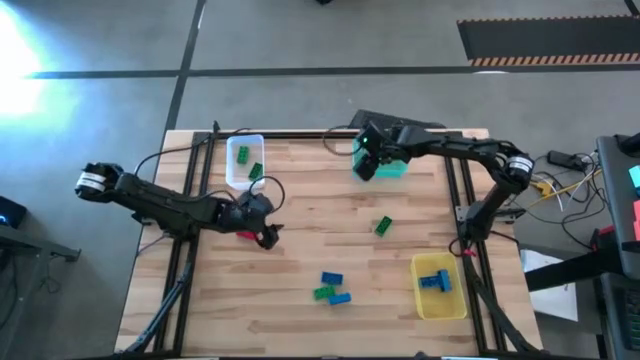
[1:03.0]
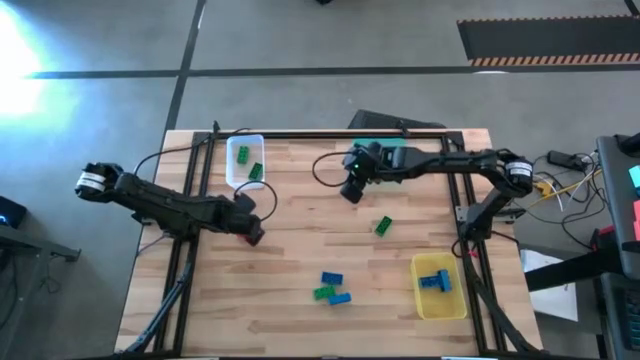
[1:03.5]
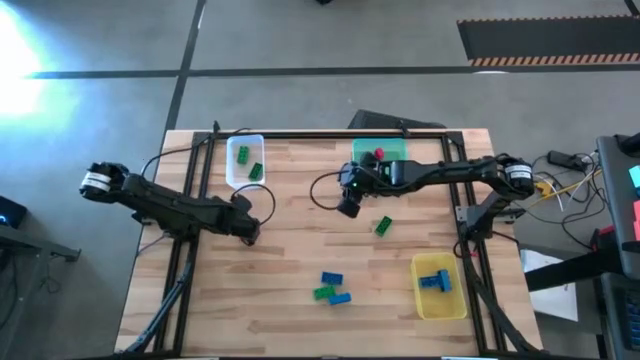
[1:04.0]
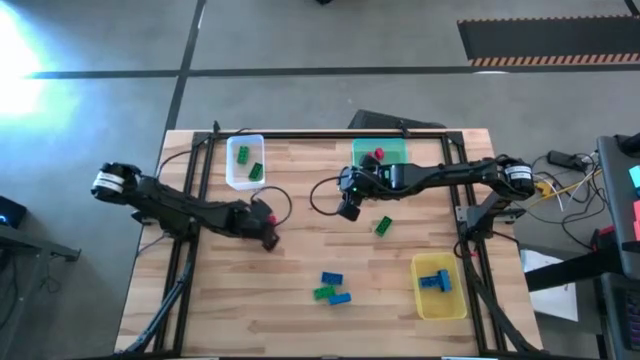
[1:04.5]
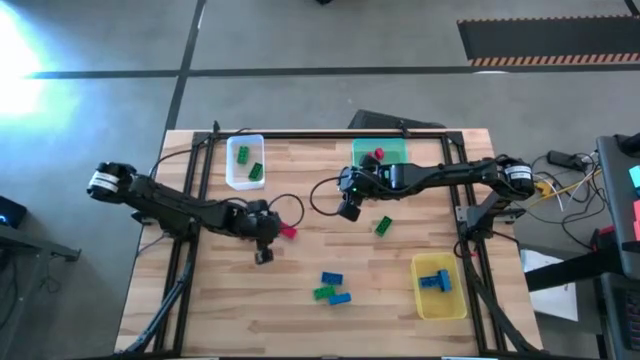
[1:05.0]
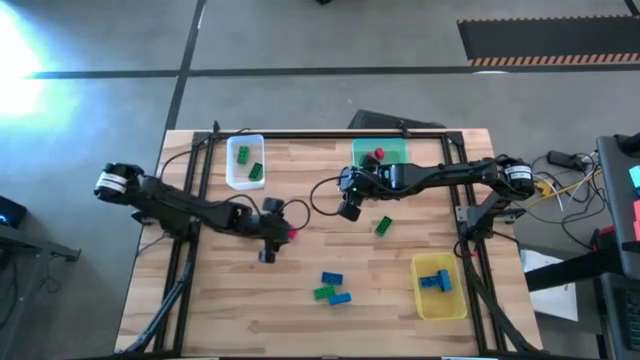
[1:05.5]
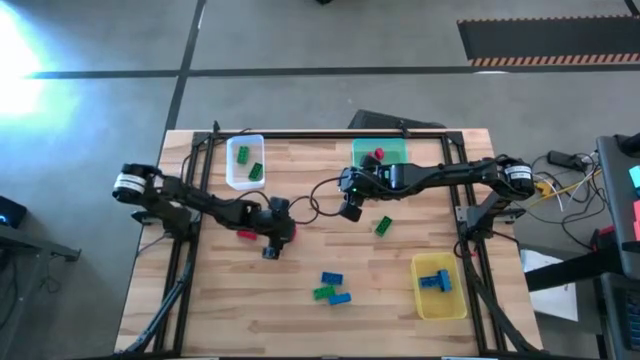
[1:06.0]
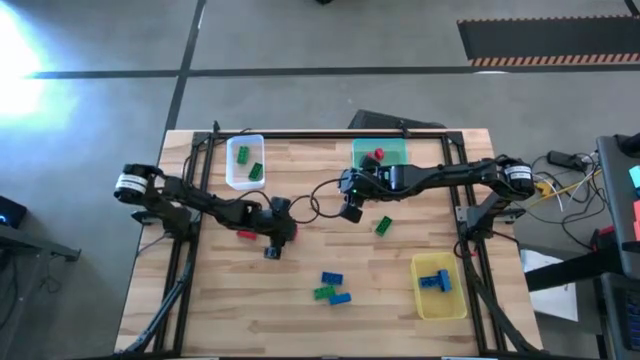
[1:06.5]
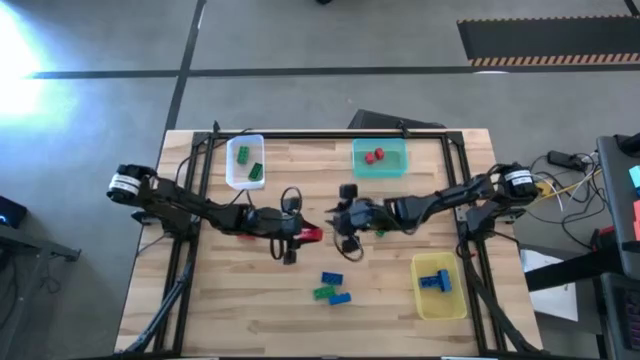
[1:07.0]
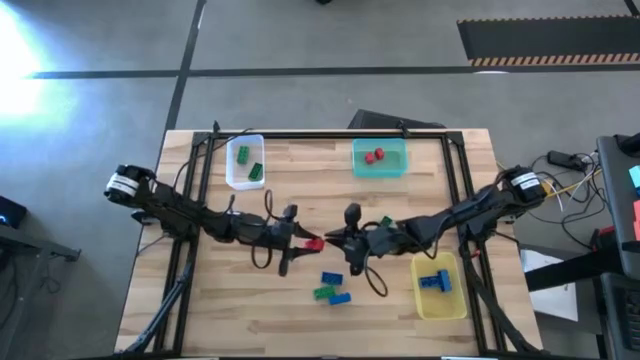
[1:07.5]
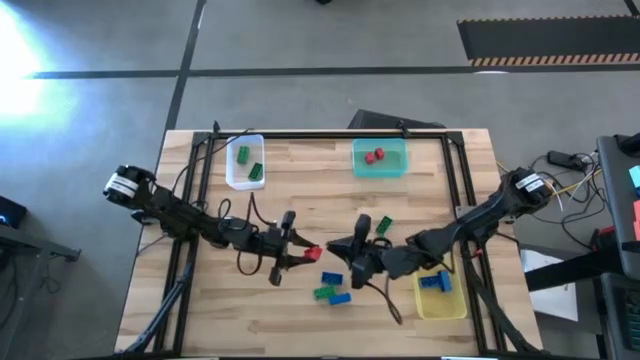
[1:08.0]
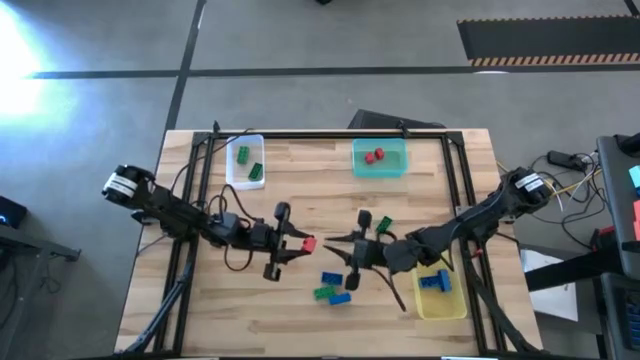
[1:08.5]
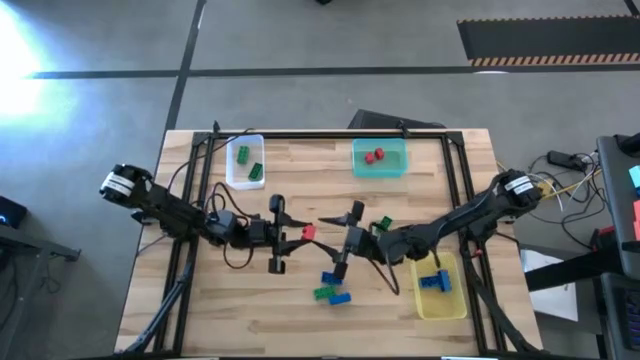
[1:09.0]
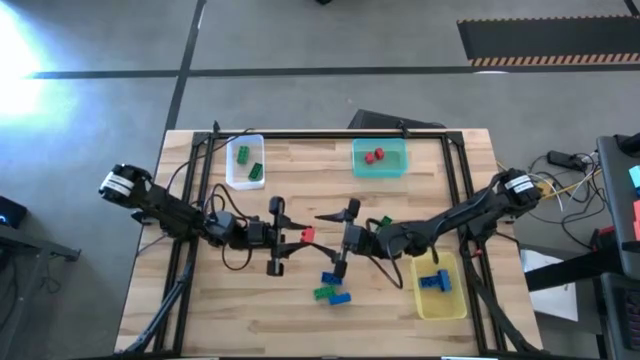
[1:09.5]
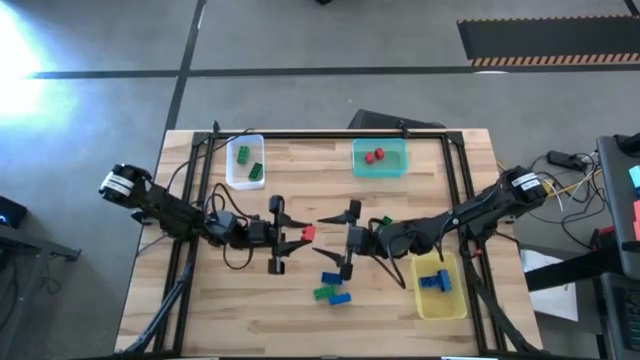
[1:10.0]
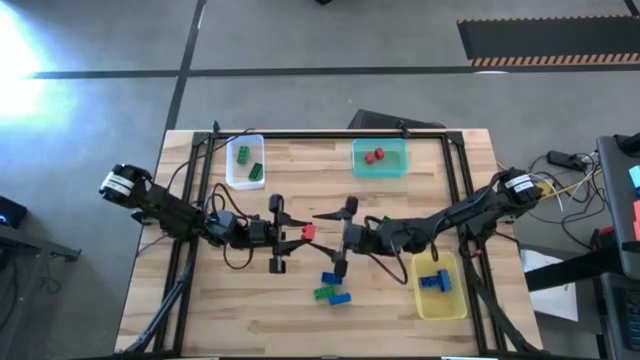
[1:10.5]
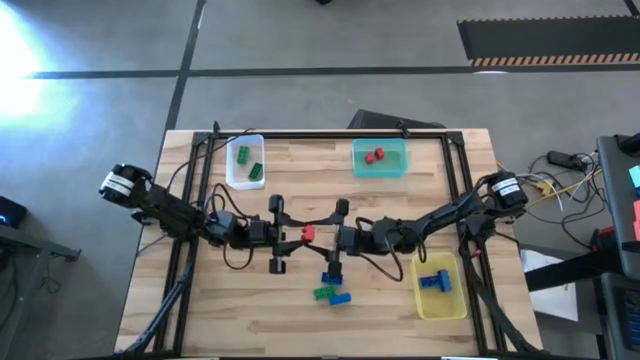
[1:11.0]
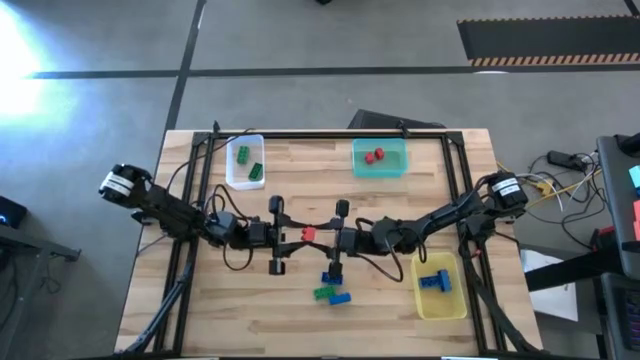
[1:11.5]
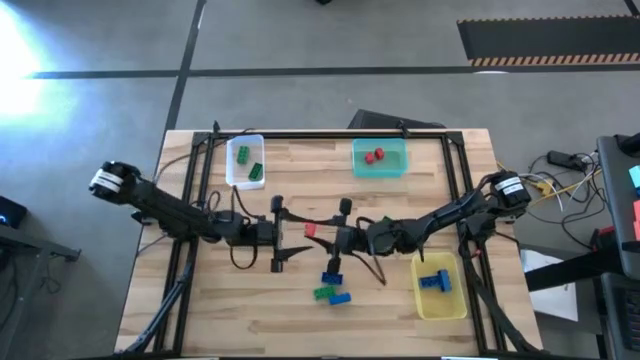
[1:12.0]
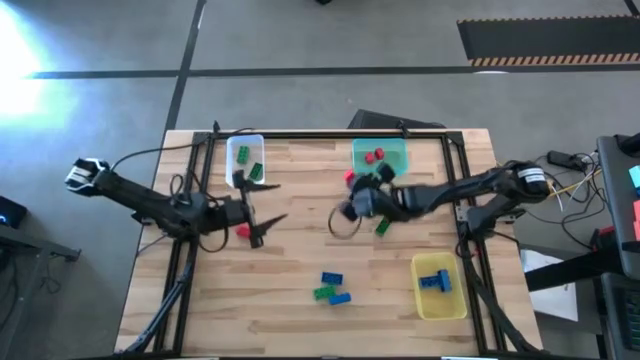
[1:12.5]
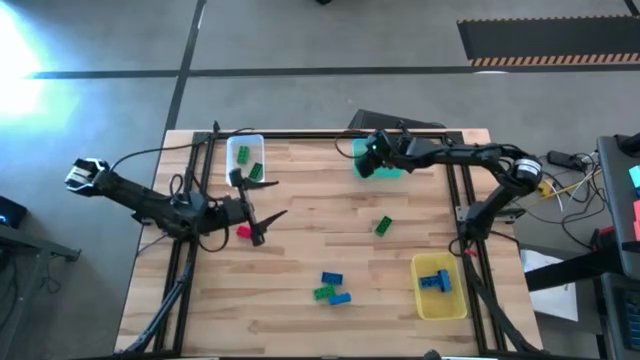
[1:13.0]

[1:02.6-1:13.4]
Task: Sort & place blocks by color
Put the red game piece into the green bin

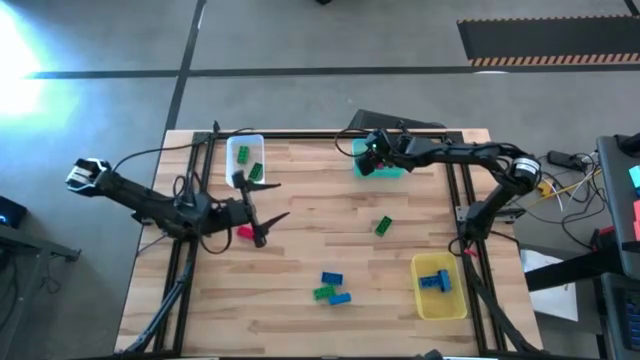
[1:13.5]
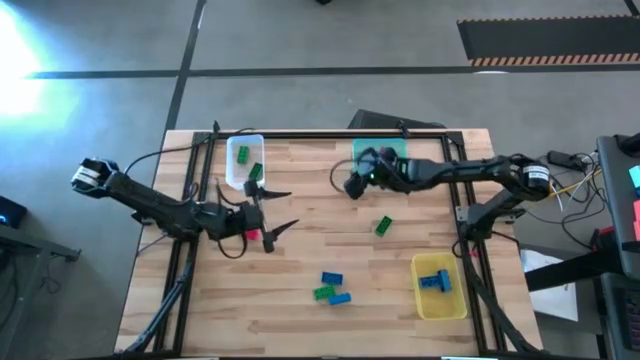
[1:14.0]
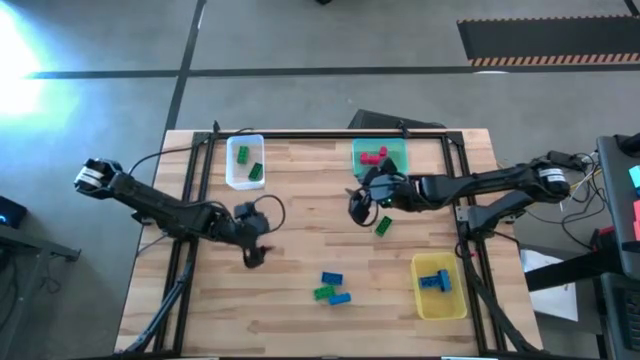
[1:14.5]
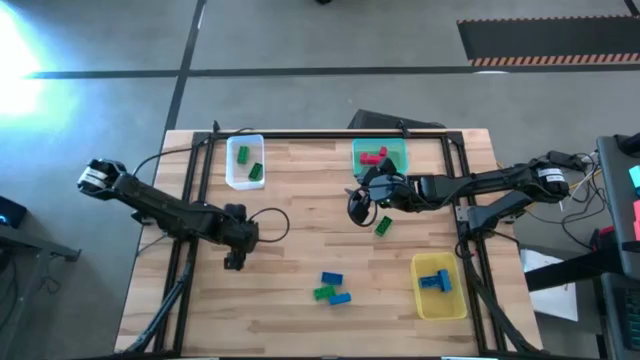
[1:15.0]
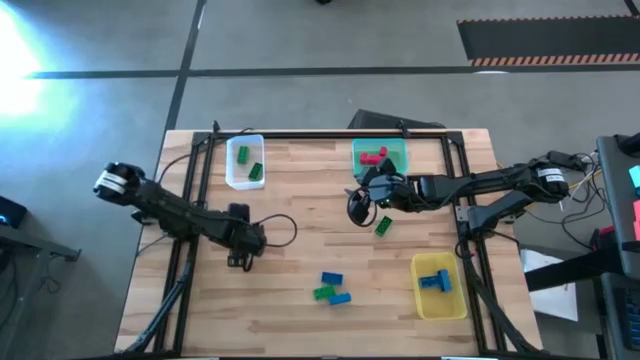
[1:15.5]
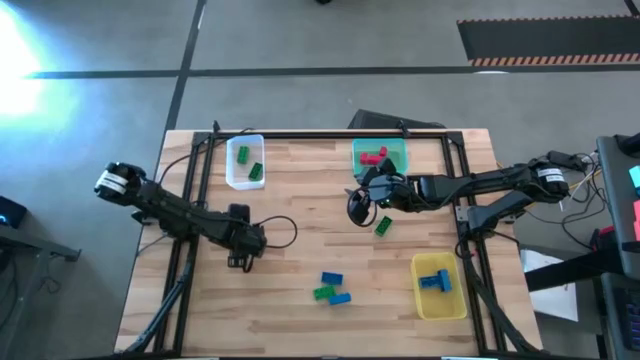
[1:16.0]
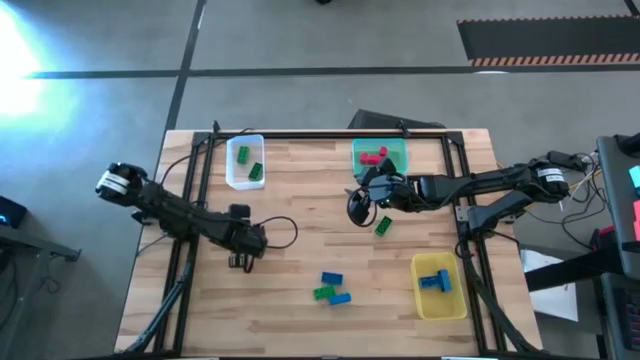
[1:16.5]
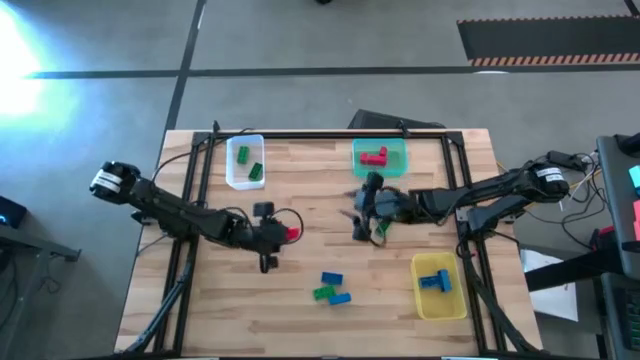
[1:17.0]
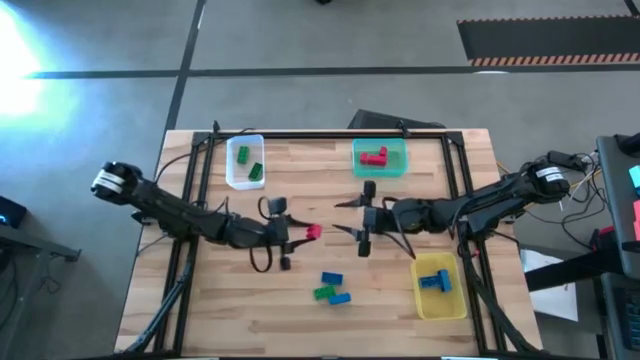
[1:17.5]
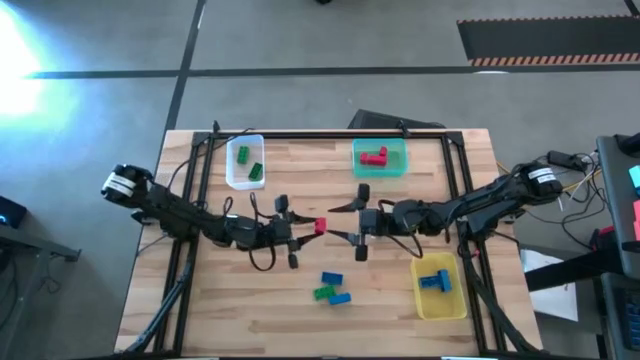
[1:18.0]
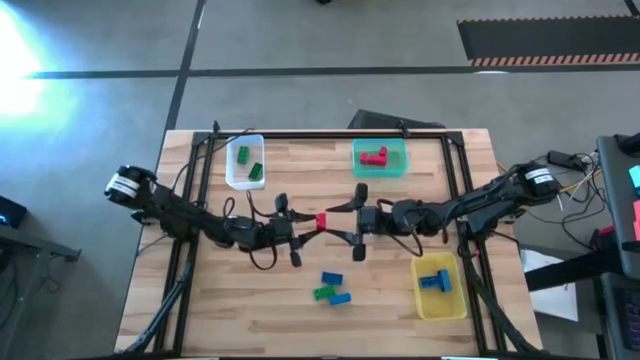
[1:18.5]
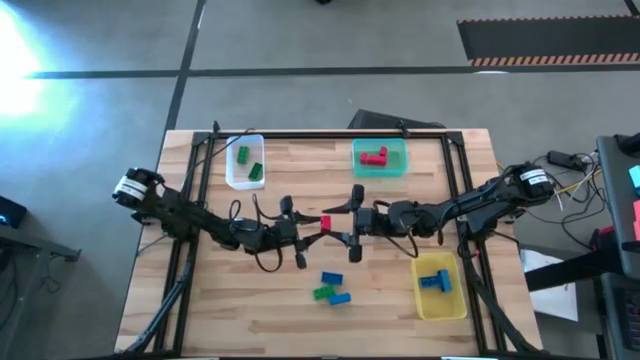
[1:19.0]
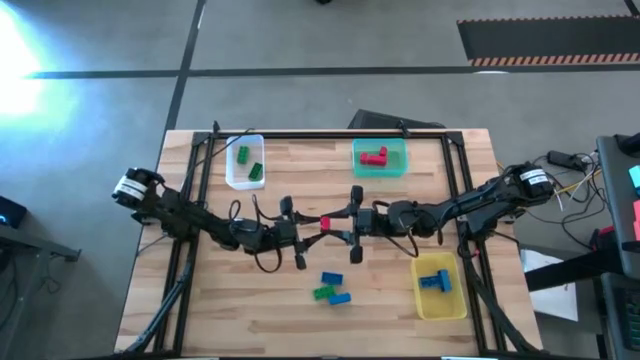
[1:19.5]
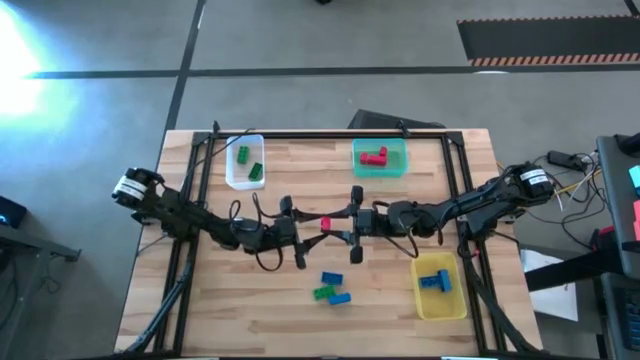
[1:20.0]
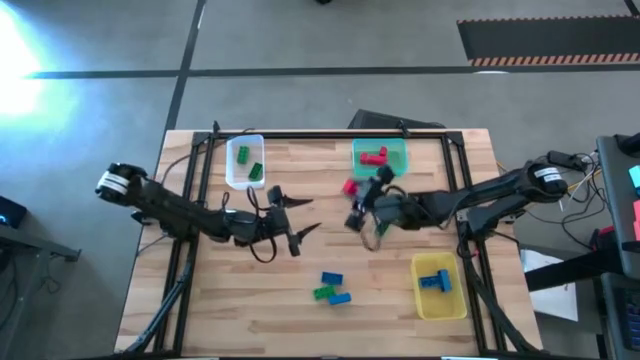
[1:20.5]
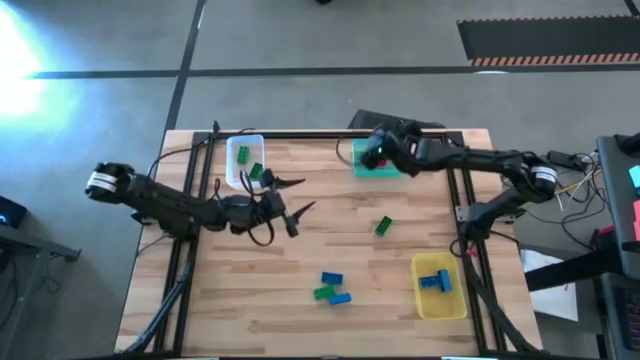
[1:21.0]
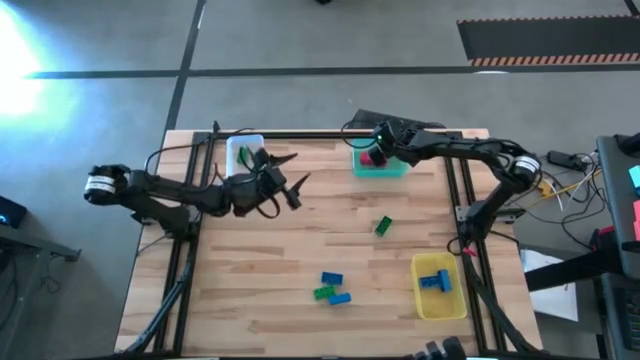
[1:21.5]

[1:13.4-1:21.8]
Put the red game piece into the green bin

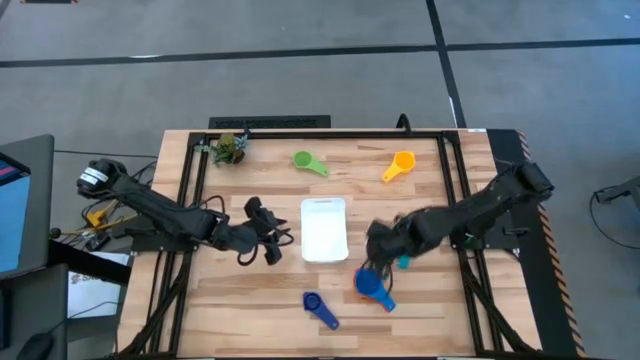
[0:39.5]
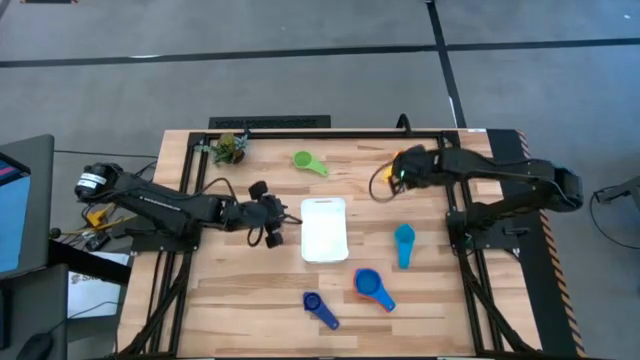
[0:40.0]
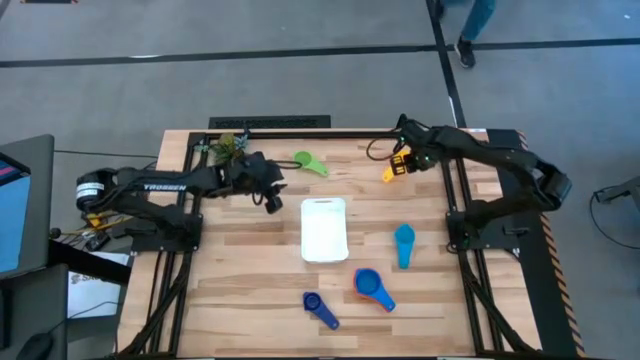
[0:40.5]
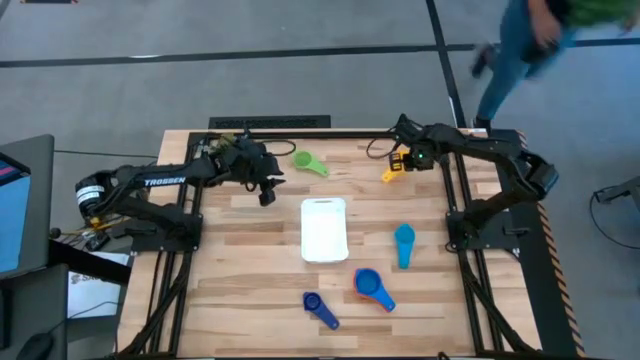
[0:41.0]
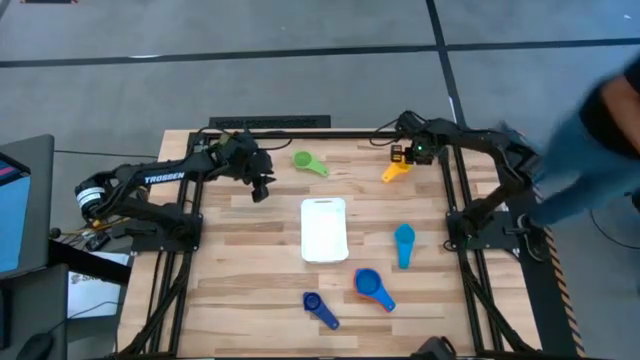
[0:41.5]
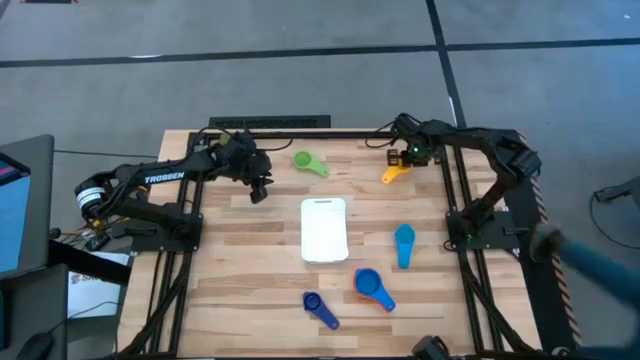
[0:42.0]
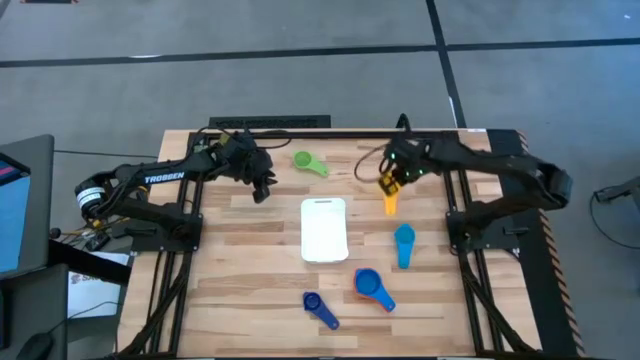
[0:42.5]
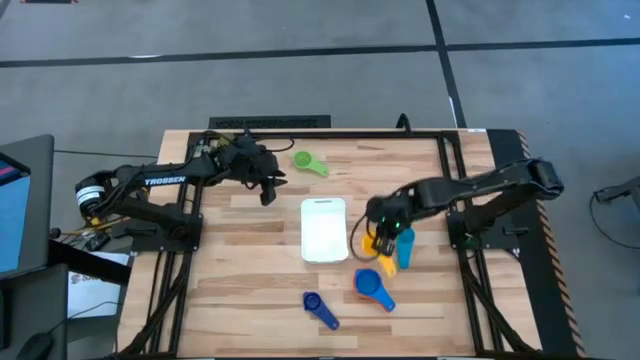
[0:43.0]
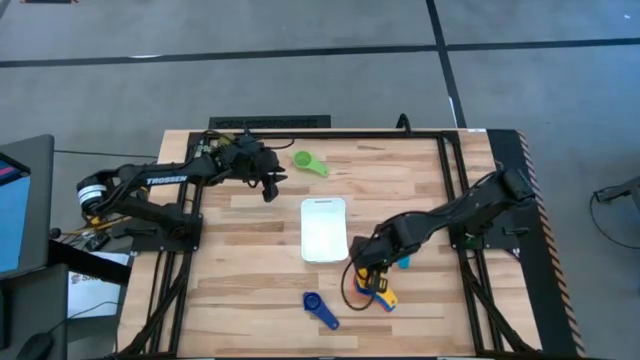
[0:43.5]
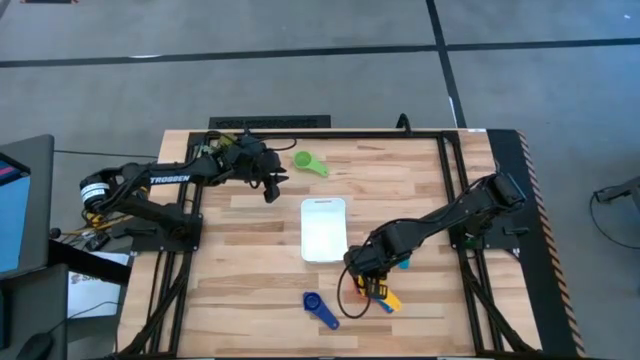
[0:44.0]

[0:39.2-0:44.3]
Task: Nest measuring cups in basket
Stack the yellow measuring cup on top of the blue measuring cup
